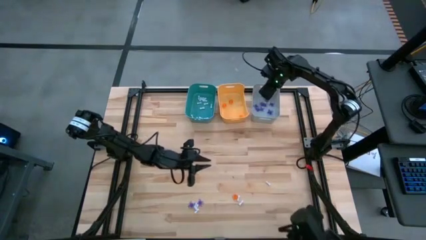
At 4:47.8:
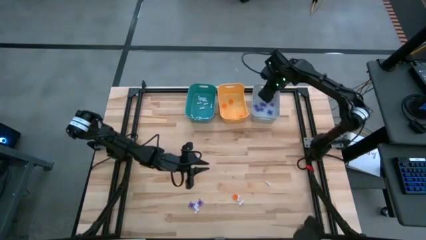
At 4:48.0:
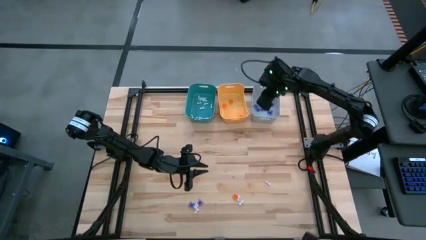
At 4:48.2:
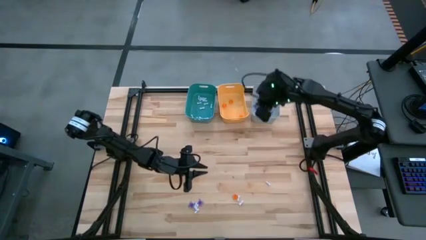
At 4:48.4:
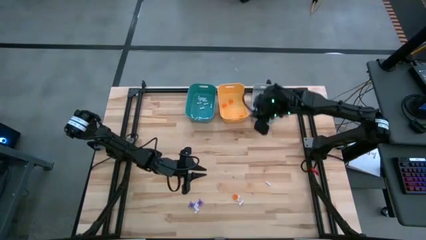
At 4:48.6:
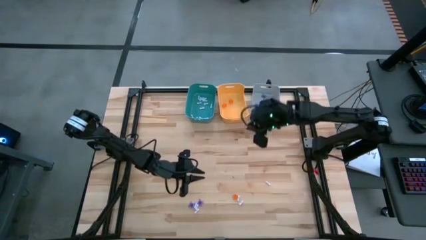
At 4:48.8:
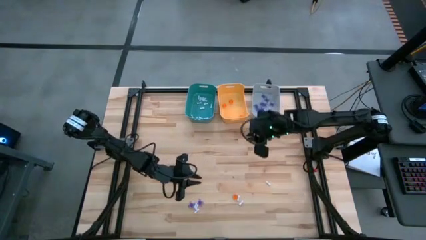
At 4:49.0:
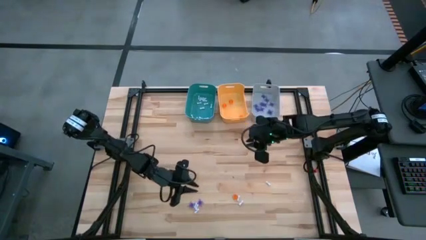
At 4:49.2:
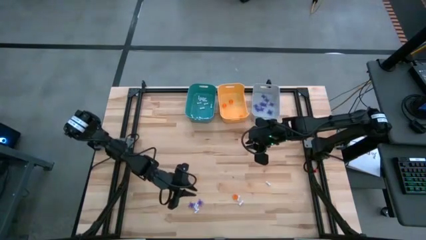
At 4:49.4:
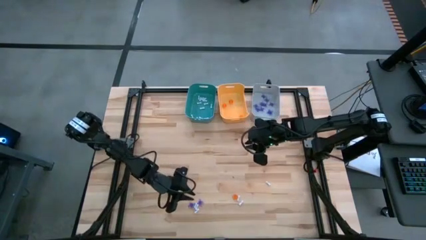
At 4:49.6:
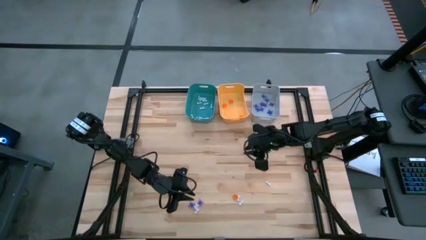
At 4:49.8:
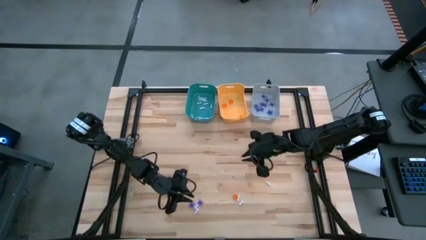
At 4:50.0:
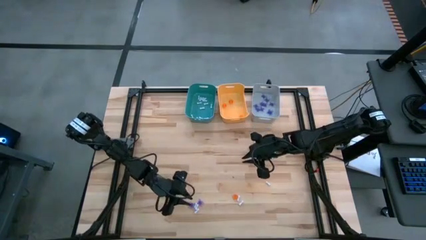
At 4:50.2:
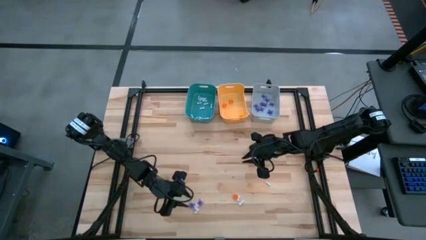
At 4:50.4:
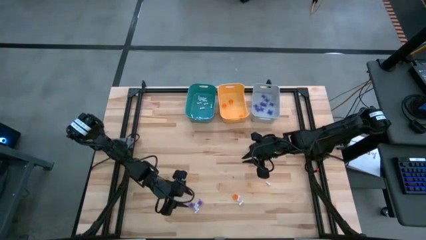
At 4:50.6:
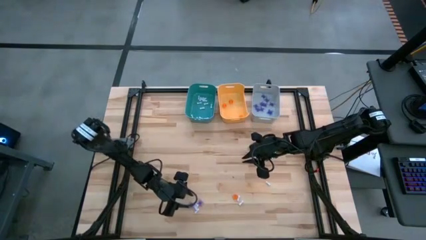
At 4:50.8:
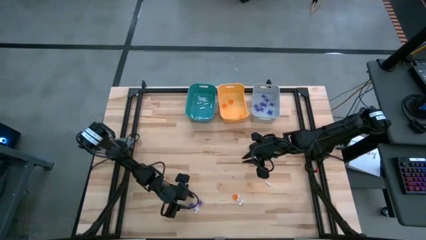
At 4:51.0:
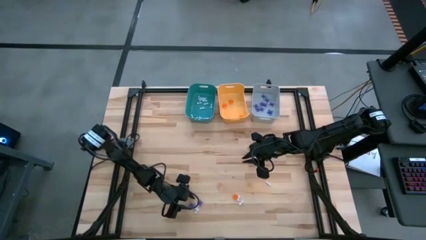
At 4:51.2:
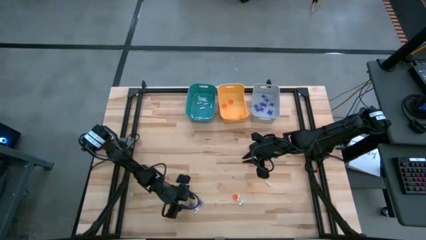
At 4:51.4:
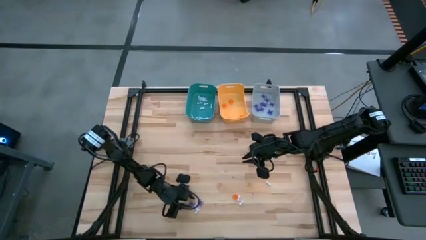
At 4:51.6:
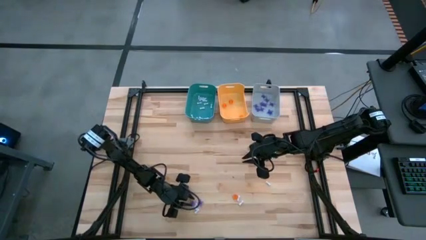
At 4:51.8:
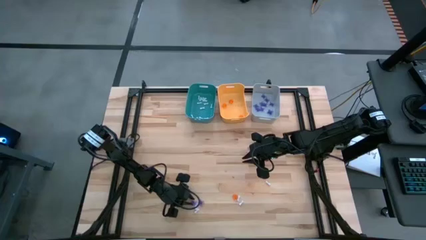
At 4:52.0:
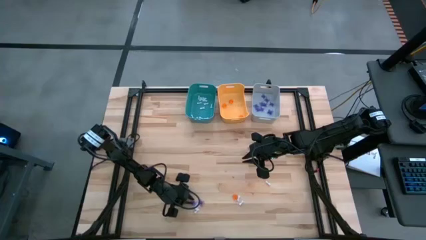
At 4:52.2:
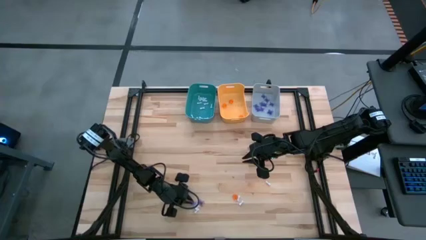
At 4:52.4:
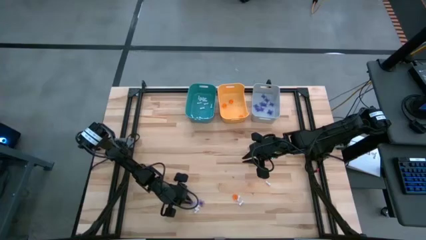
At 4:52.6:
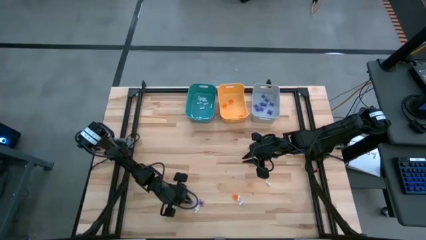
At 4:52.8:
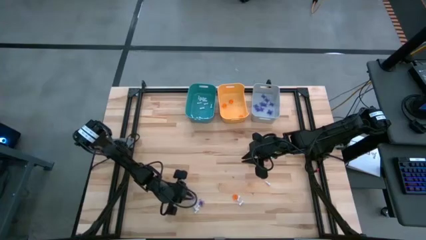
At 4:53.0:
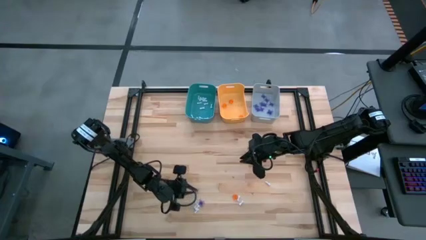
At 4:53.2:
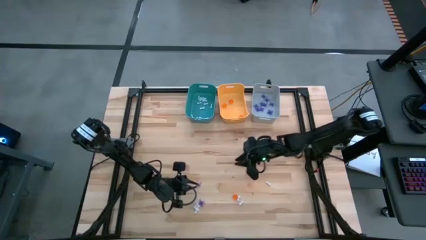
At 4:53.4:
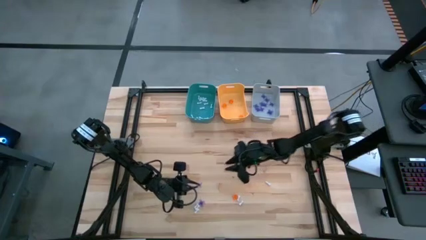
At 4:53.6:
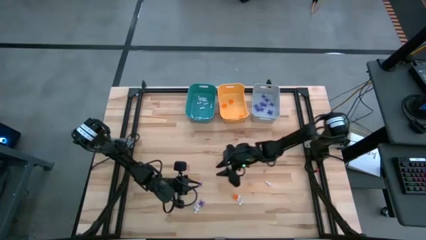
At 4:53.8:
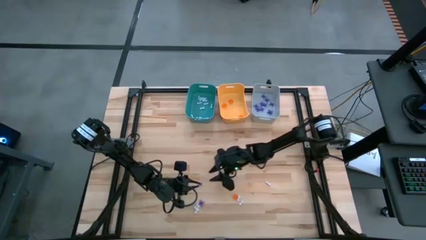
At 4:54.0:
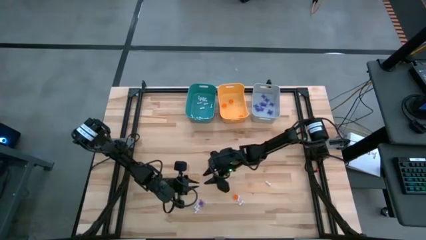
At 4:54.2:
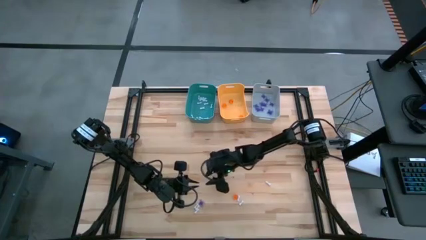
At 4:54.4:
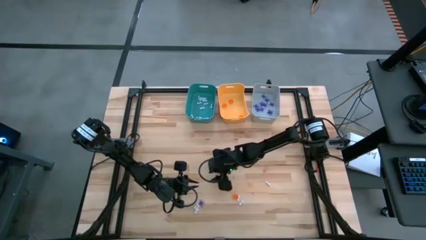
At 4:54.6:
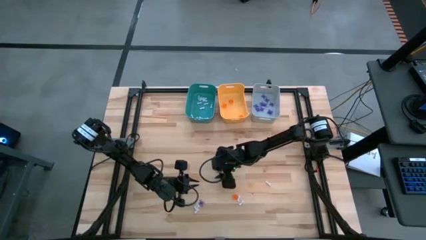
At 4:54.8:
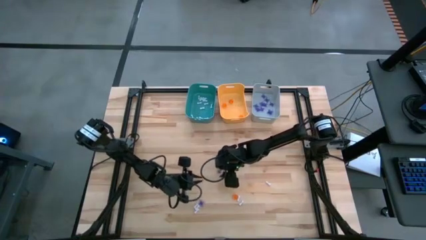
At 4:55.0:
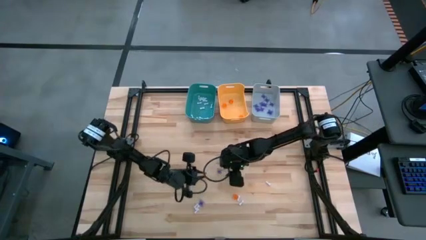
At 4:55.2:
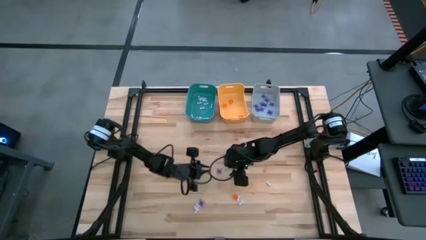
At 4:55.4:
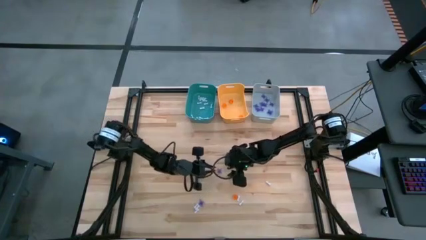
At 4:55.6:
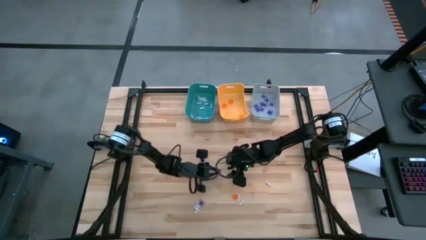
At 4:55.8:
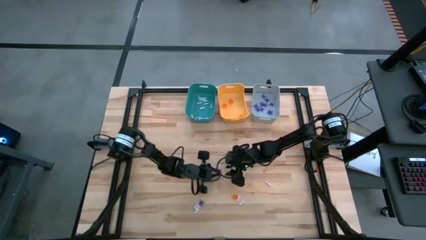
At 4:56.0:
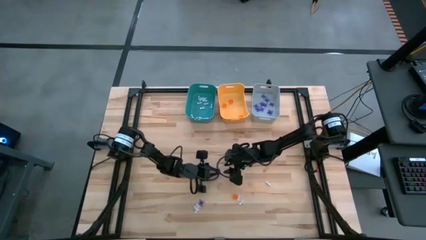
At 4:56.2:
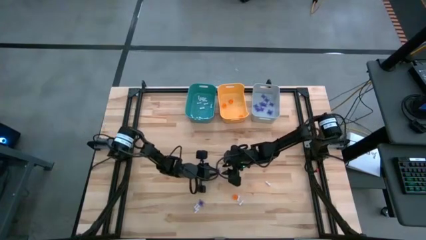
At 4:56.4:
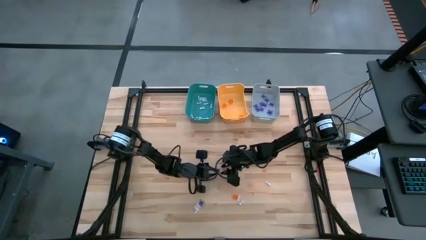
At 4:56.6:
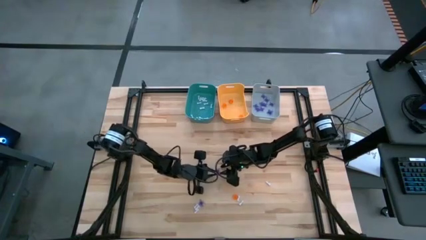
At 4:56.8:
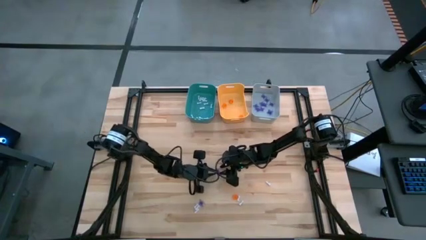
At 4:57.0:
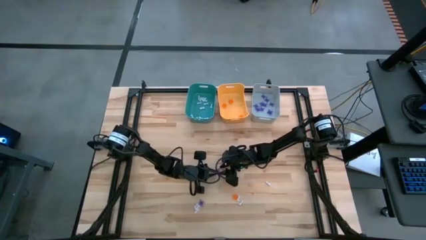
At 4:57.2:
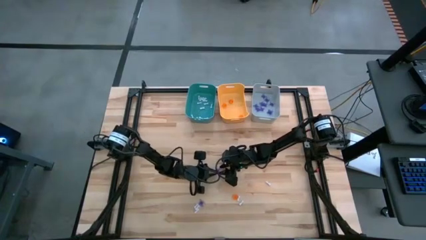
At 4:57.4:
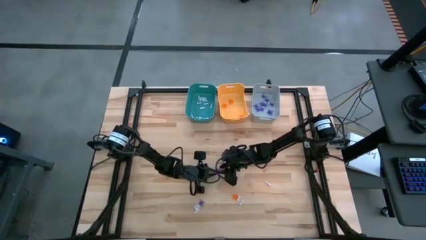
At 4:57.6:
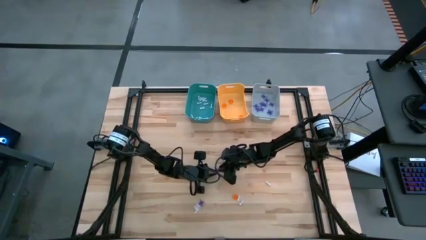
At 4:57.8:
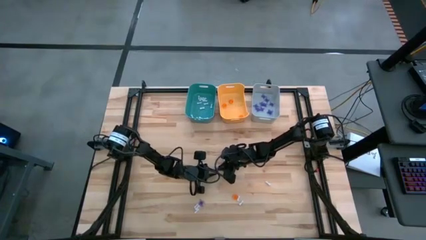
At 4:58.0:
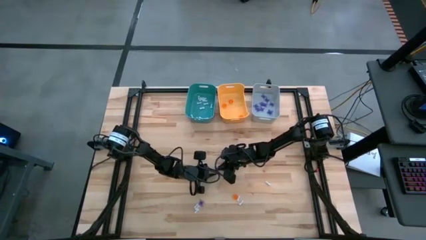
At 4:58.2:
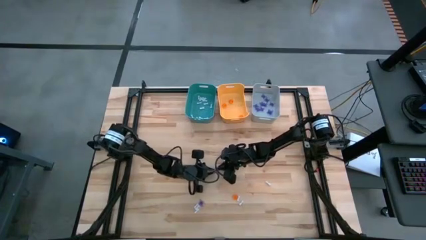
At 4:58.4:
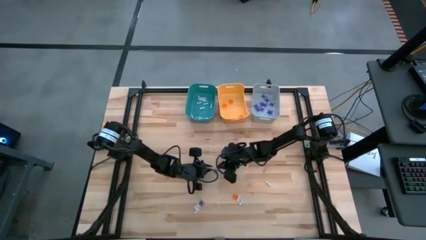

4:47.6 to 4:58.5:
Task: Sort Halloween decoration
Put the purple spider toy into the gray bin

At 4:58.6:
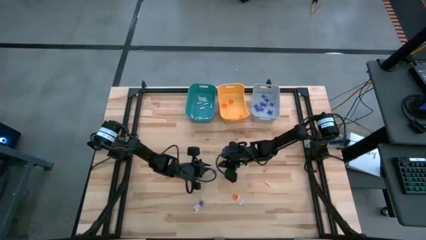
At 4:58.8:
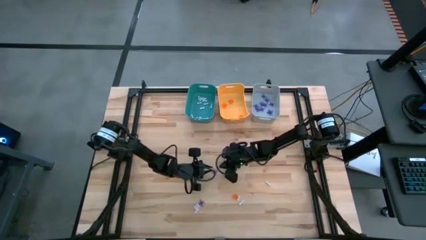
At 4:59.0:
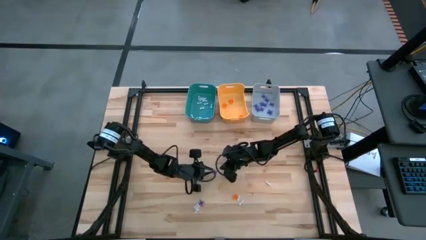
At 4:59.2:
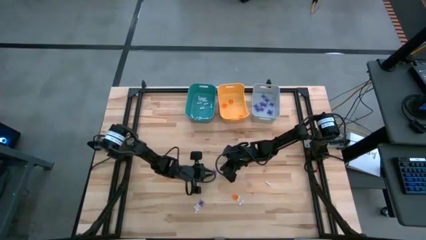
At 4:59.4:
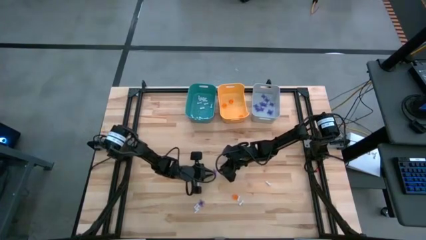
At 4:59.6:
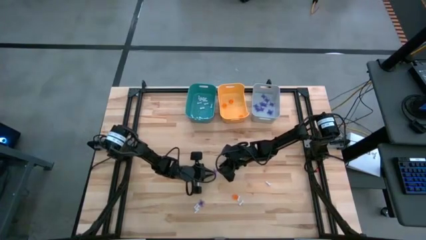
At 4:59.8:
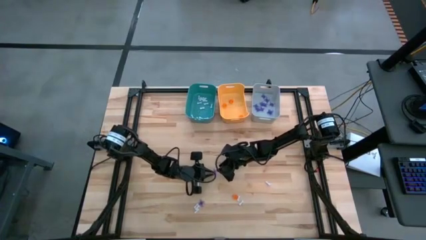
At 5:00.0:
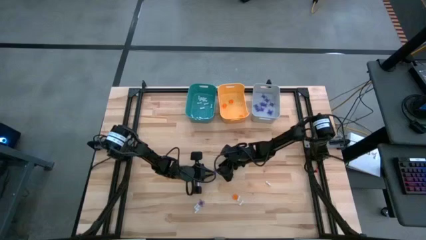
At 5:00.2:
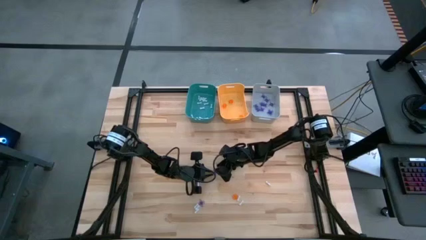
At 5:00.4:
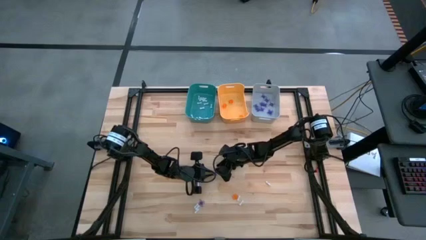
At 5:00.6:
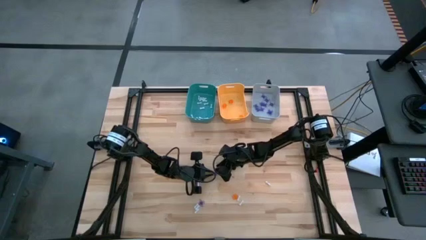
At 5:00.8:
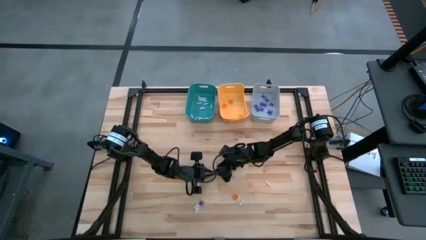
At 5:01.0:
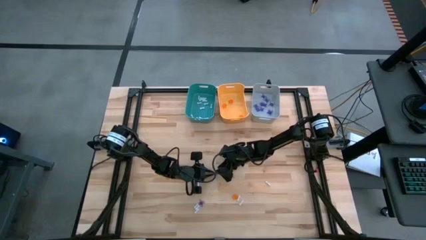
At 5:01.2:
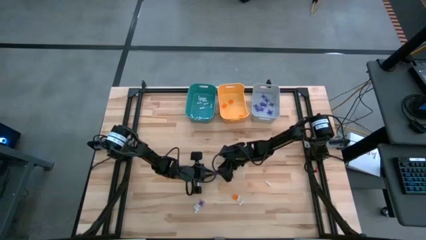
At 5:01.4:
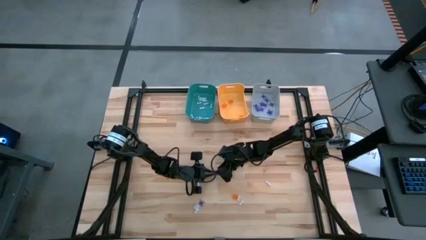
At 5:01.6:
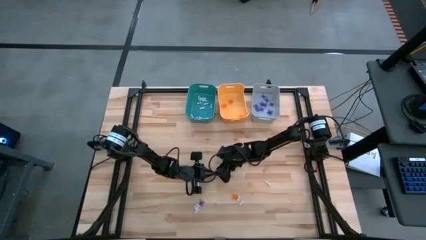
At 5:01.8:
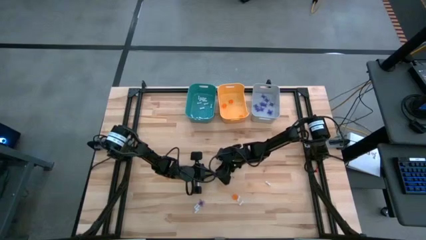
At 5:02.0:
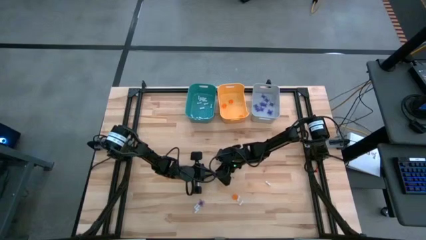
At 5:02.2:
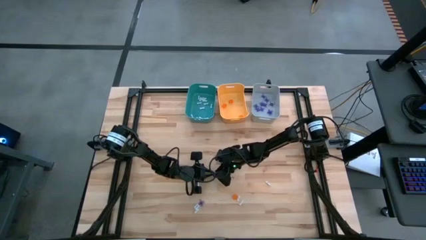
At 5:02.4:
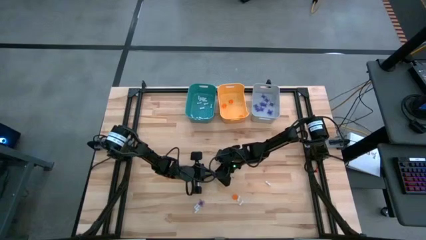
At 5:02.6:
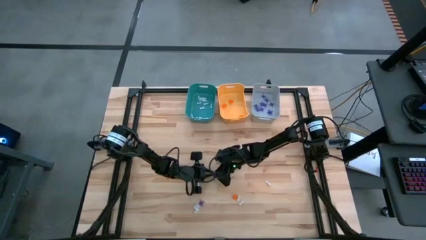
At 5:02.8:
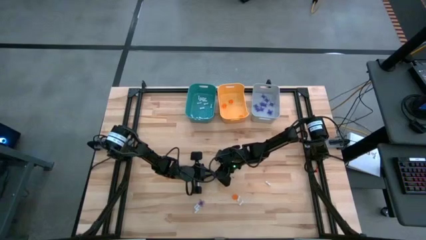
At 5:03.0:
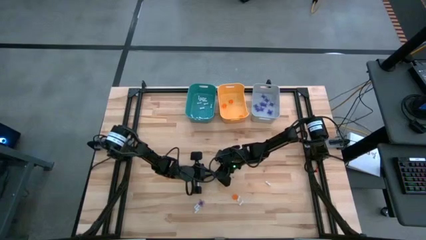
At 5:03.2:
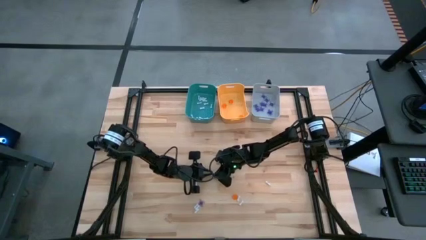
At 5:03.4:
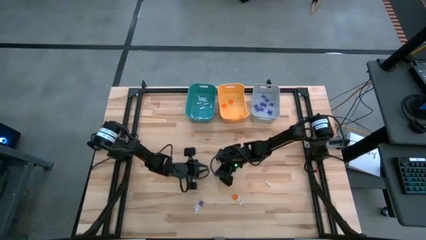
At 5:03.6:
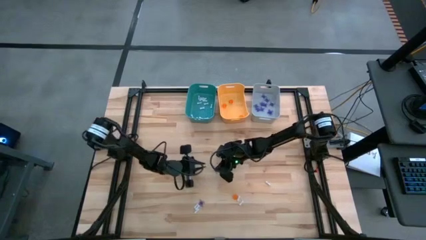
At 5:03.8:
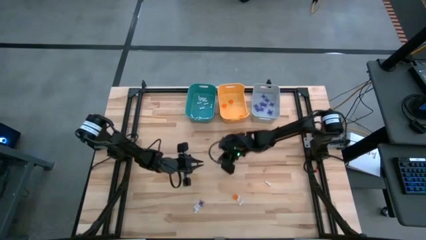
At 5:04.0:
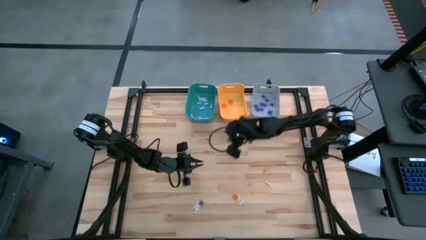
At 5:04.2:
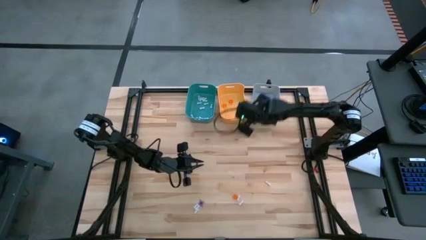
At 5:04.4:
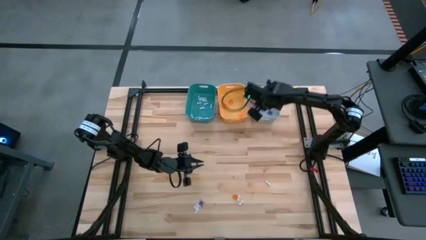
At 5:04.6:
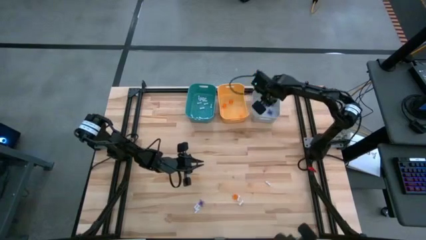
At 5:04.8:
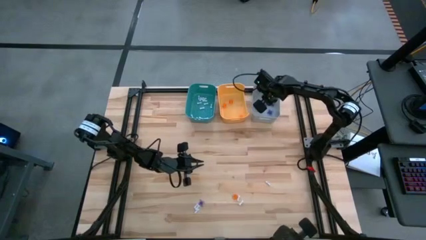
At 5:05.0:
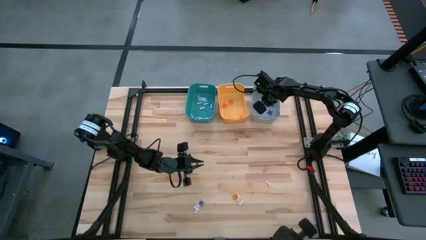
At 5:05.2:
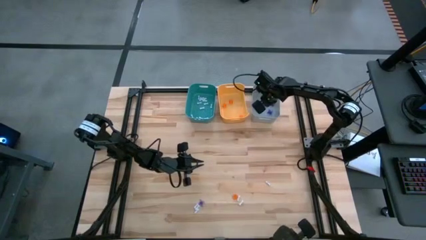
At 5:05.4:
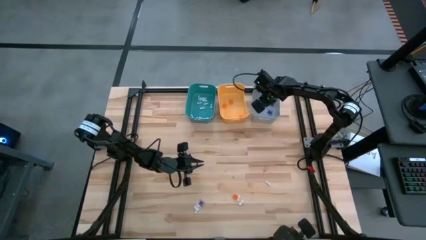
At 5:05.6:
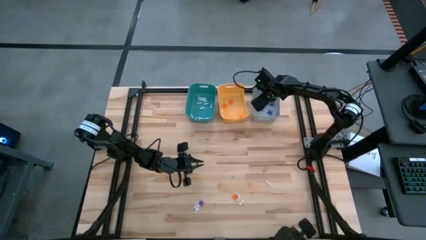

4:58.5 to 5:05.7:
Put the purple spider toy into the gray bin
